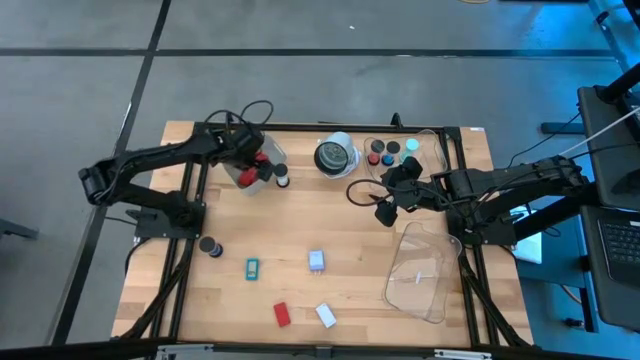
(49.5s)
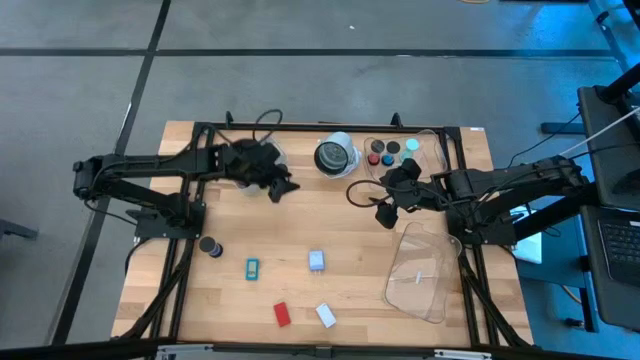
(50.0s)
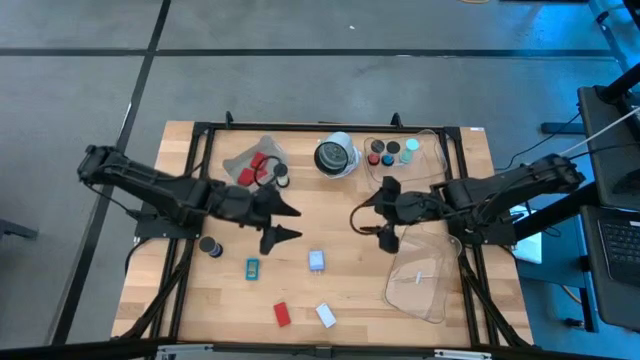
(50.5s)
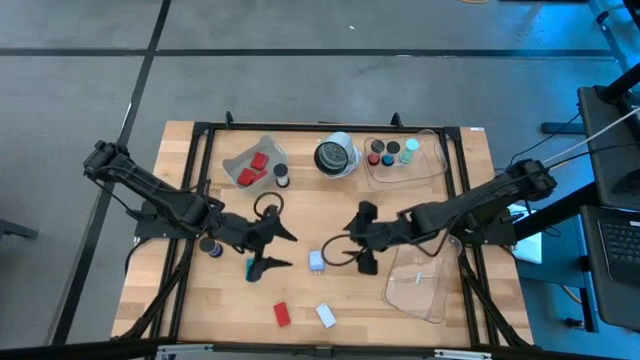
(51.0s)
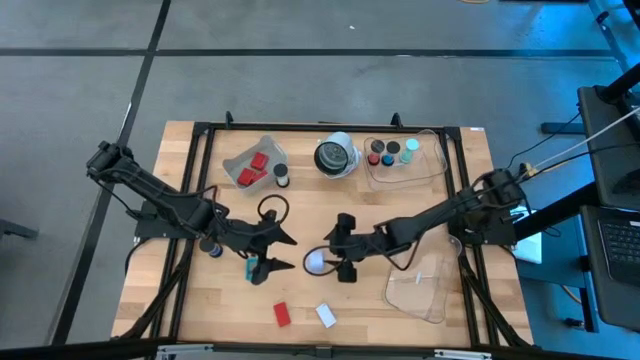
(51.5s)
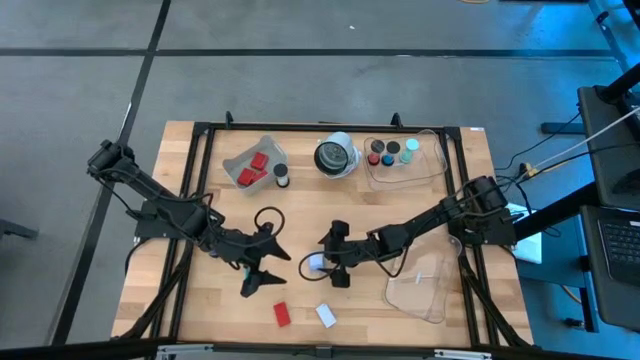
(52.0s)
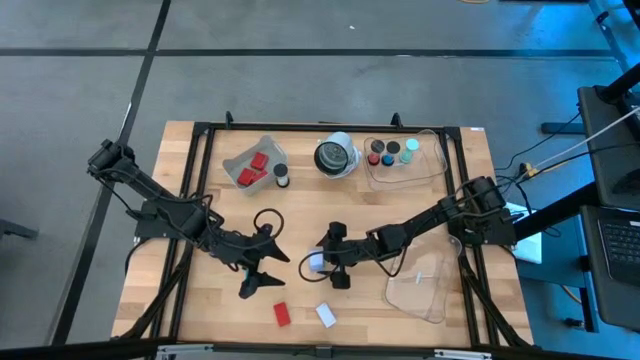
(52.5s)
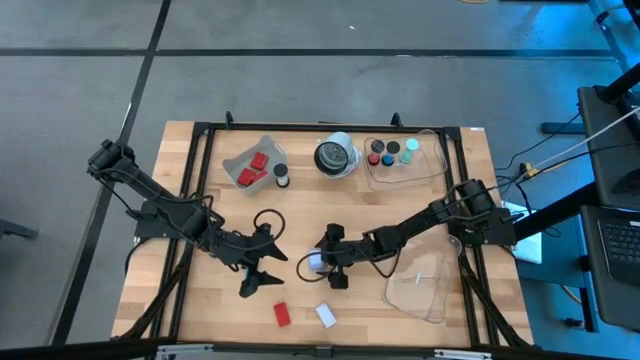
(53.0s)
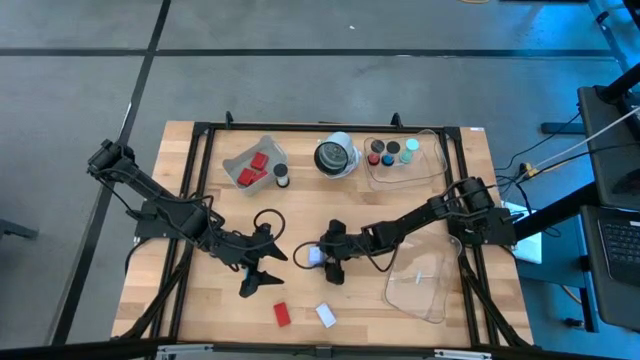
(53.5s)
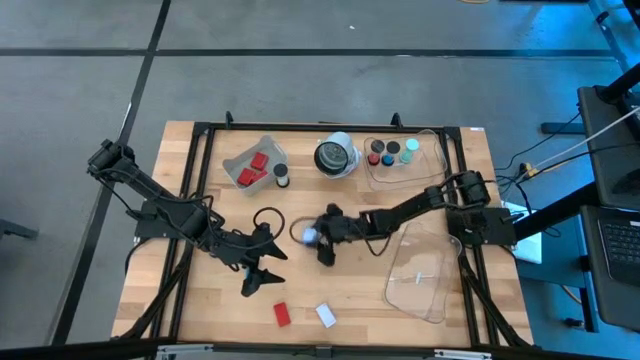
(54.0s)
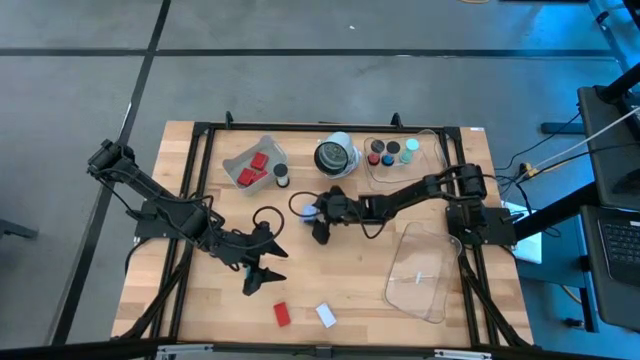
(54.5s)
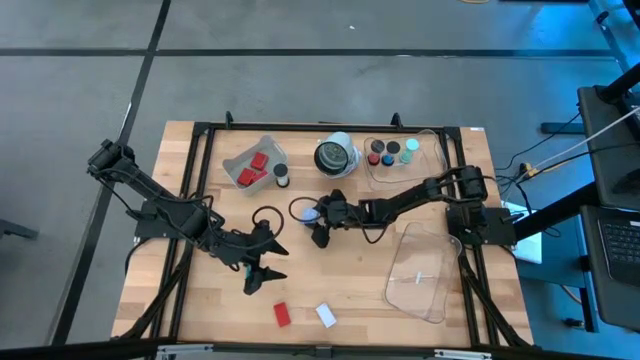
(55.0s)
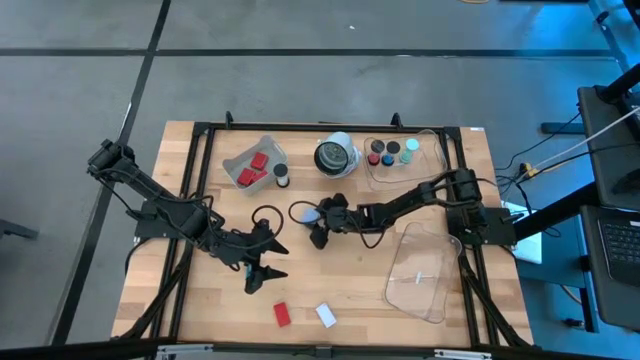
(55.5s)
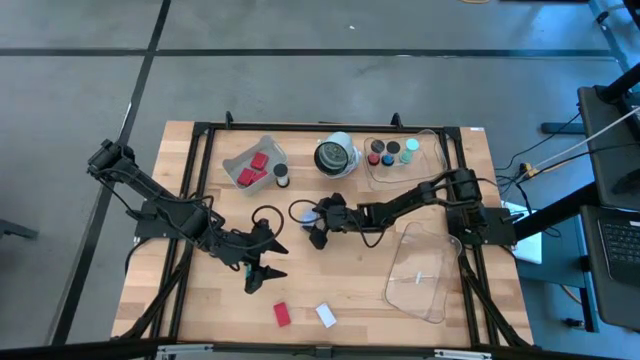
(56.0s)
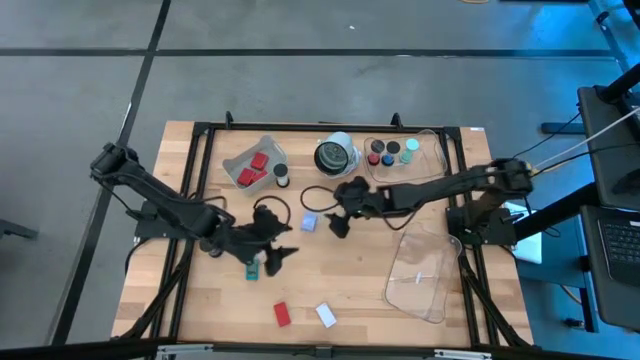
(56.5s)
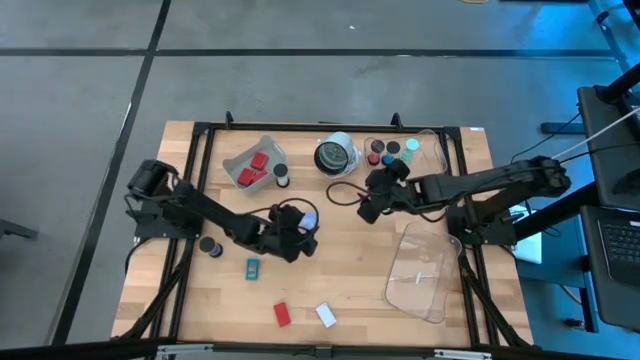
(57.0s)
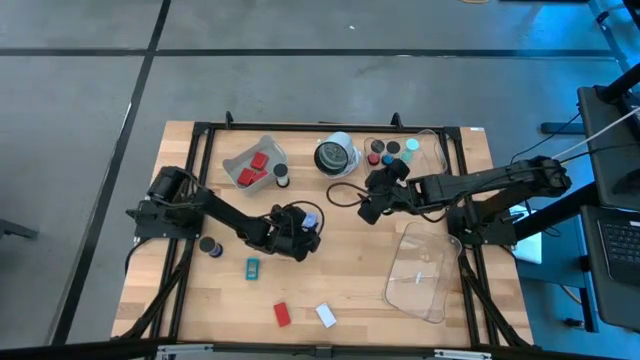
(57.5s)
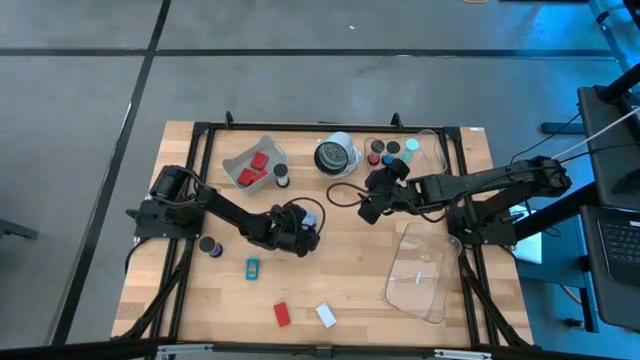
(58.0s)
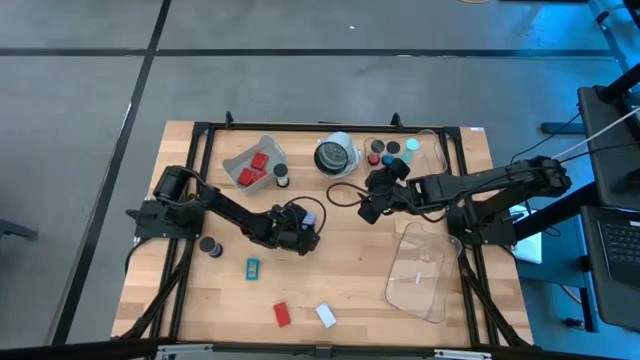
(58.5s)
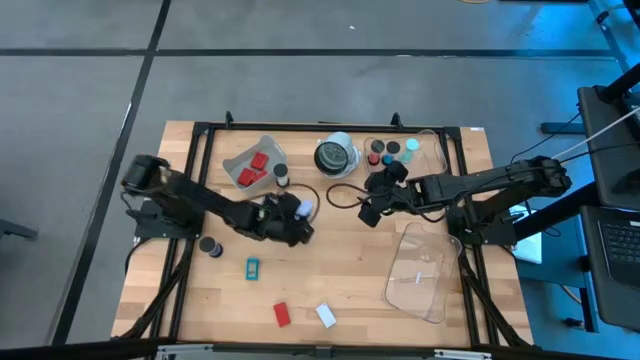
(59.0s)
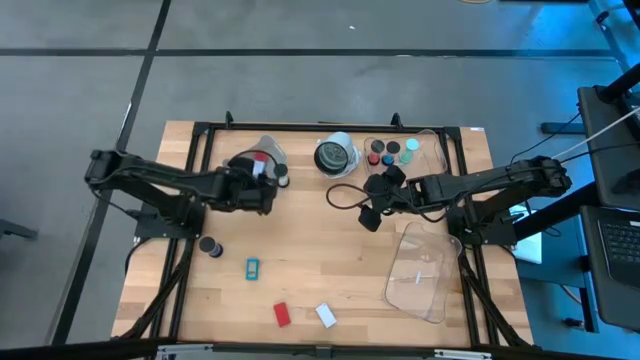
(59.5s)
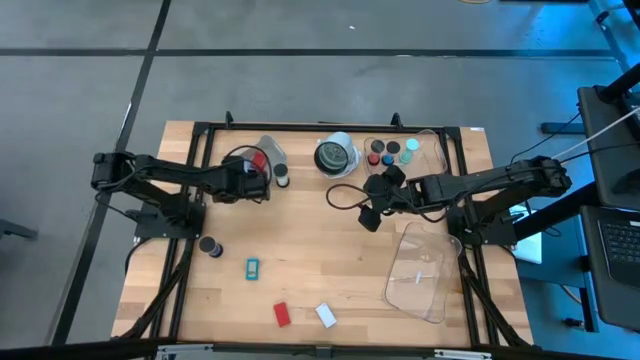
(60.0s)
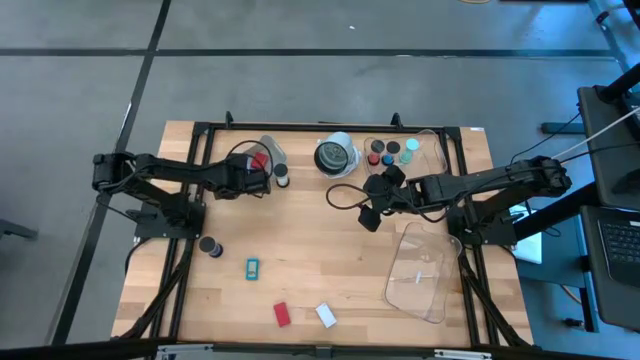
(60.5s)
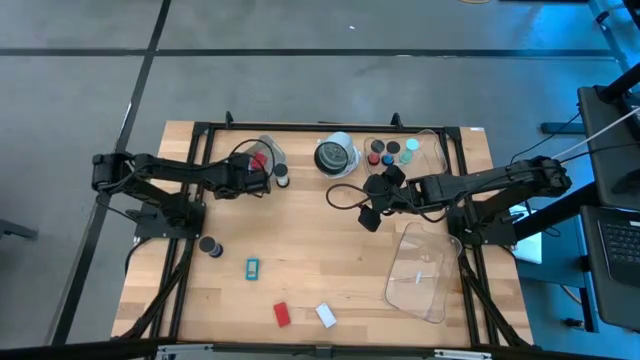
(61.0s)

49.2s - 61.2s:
Task: Pick & Place Office items
Put the light blue charger adapter into the gray bin

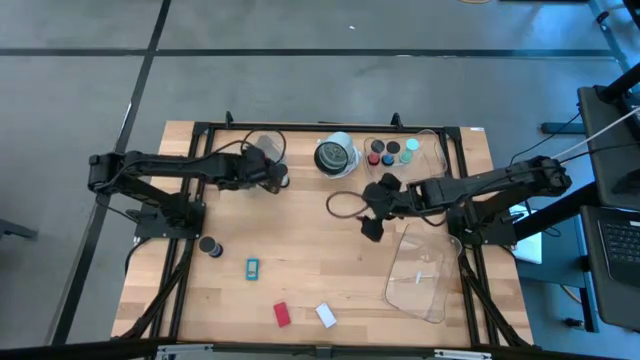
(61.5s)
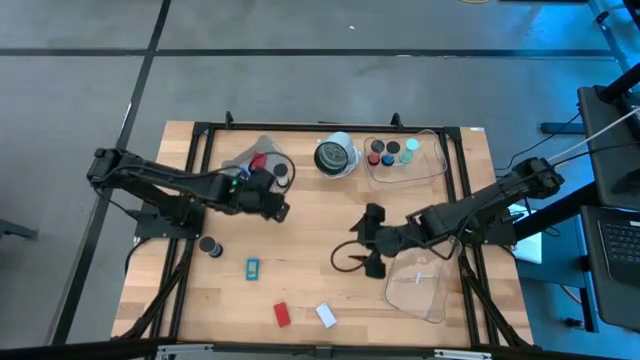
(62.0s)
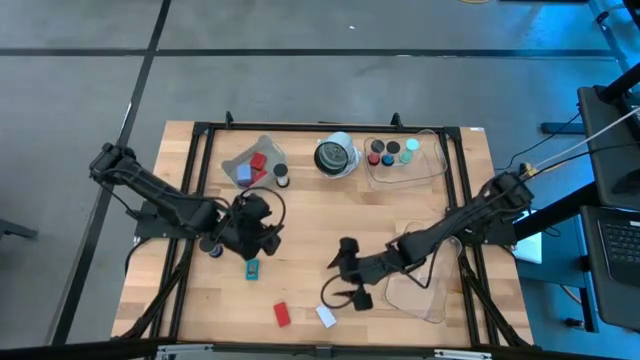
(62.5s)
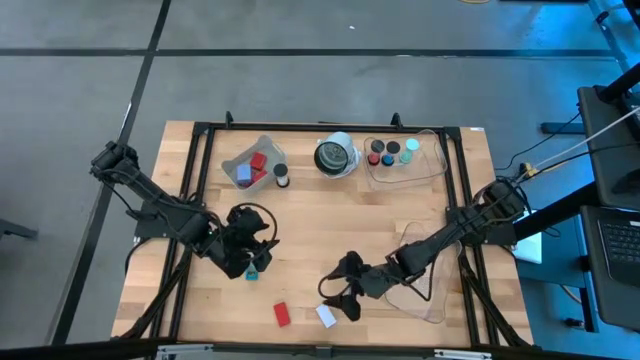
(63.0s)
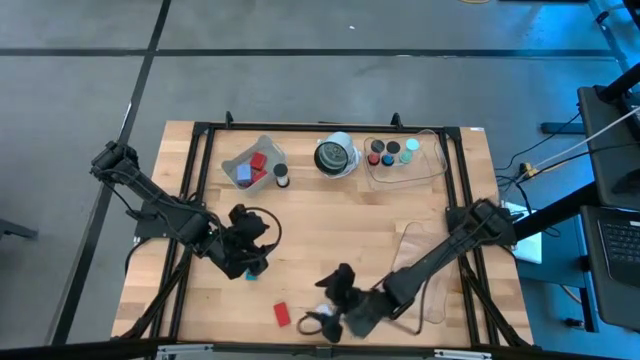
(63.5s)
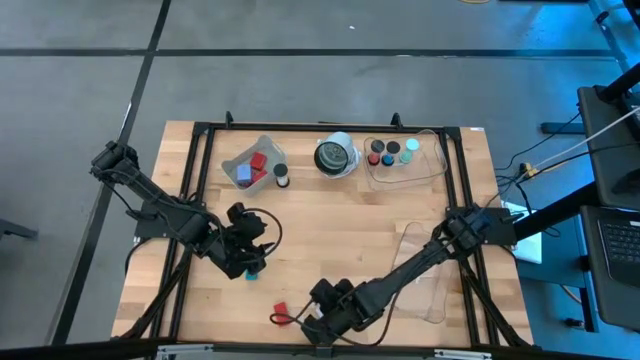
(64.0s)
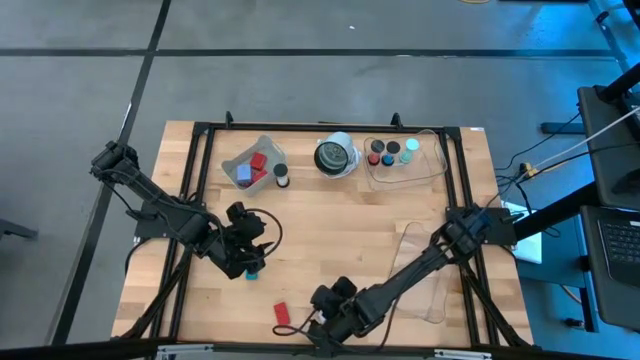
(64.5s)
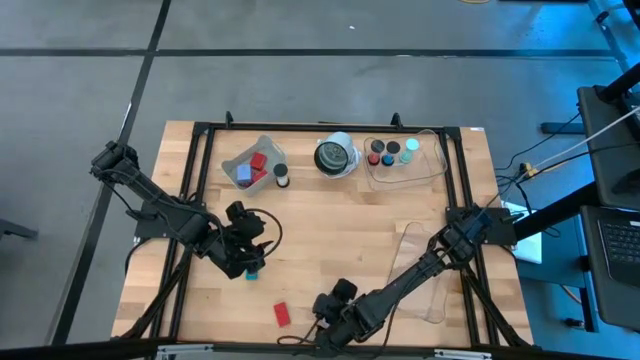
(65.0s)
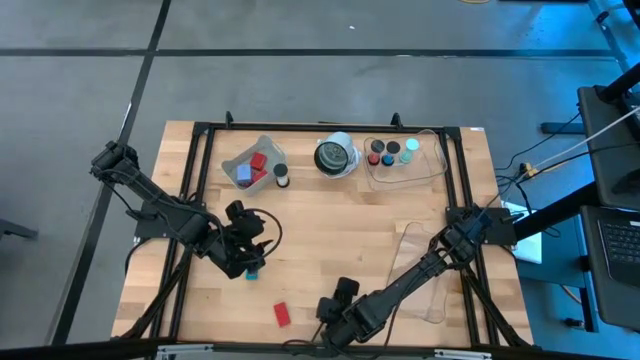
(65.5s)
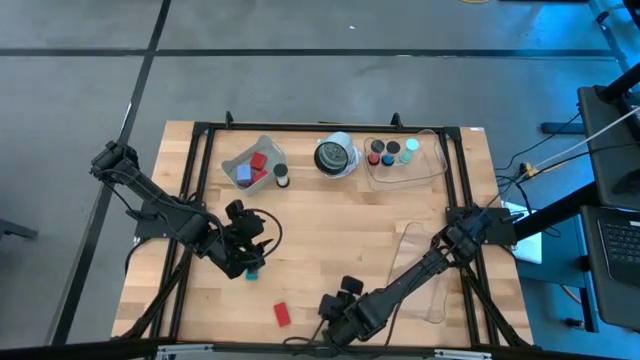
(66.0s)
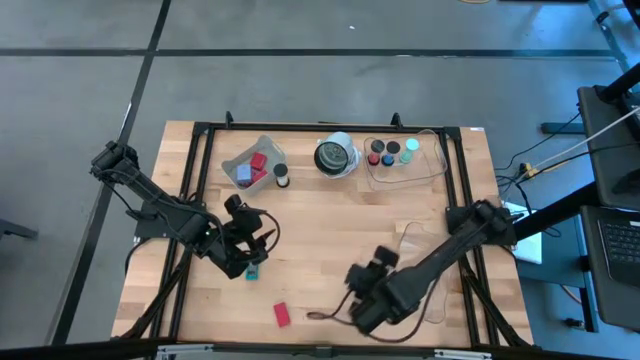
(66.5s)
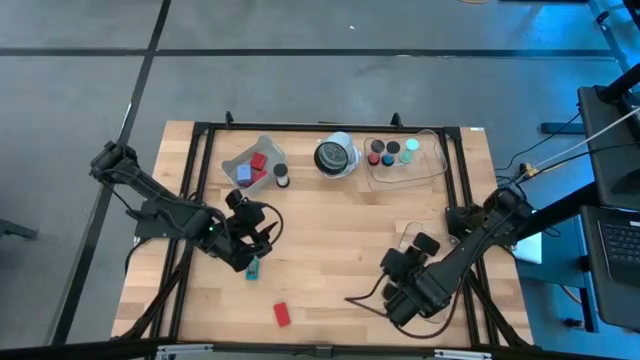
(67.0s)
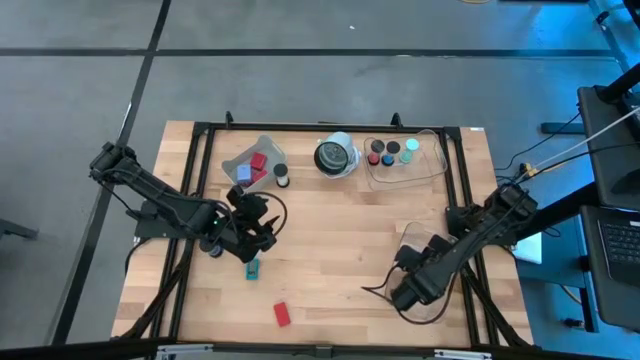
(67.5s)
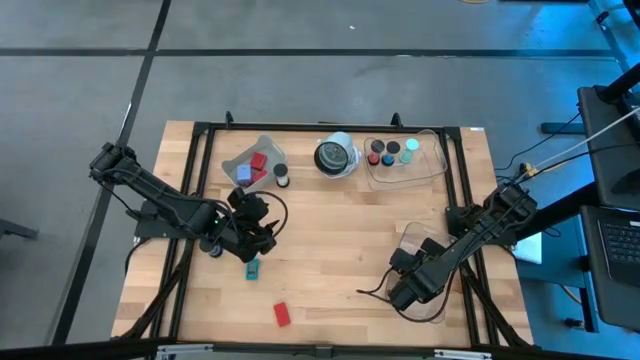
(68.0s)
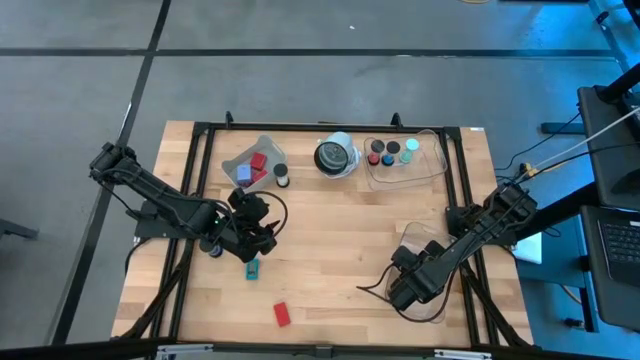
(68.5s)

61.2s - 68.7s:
Put the white digital clock into the bottom transparent bin

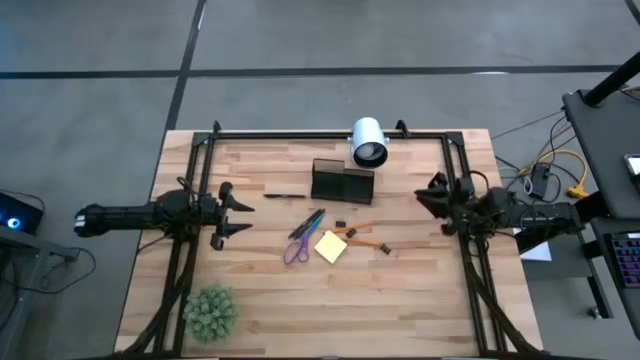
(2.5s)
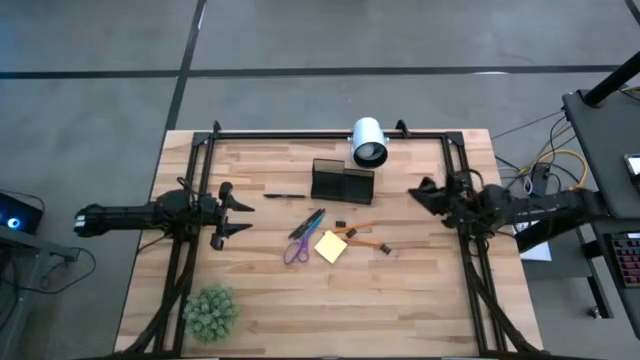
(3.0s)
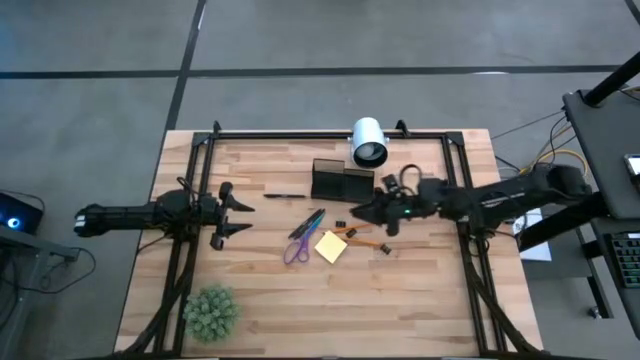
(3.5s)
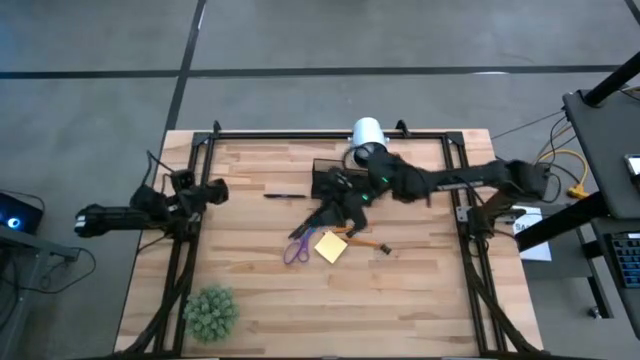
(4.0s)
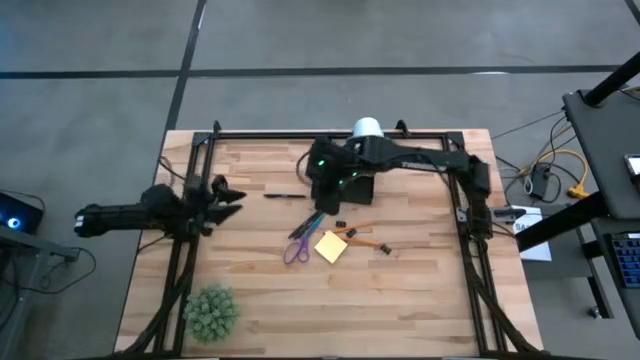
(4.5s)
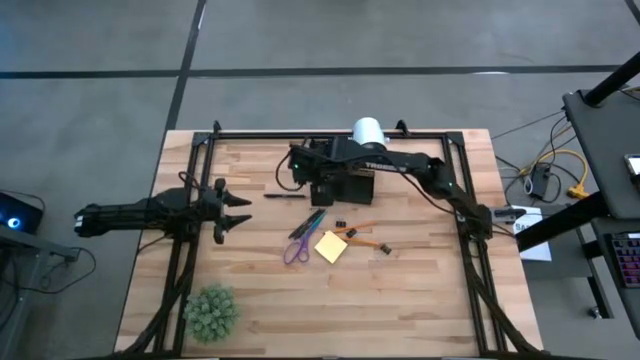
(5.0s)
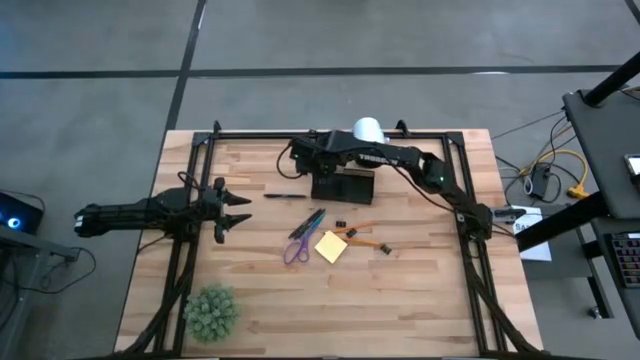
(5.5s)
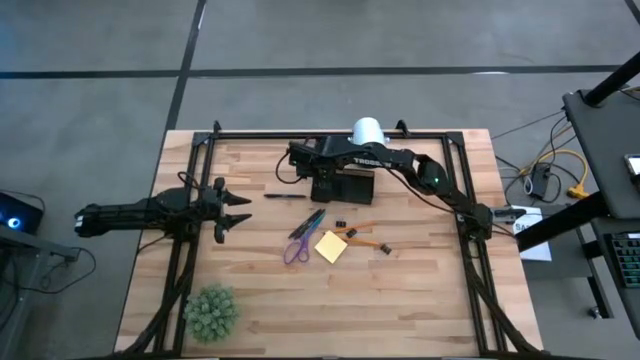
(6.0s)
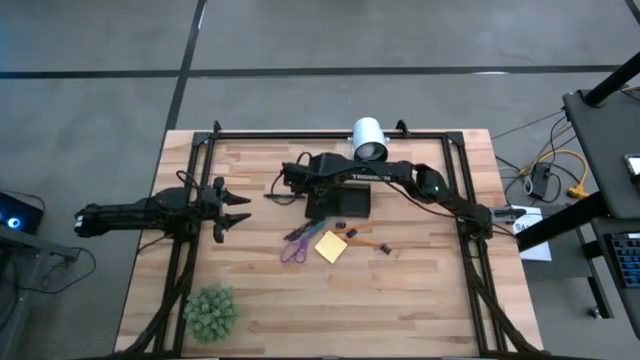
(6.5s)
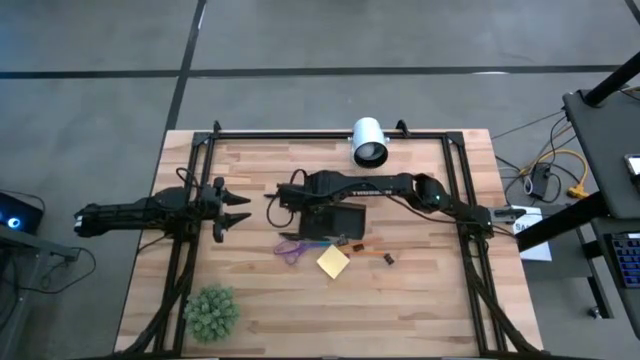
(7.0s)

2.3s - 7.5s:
Task: Pick and place office supplies into organizer
Move the black mesh organizer to the center of the table
